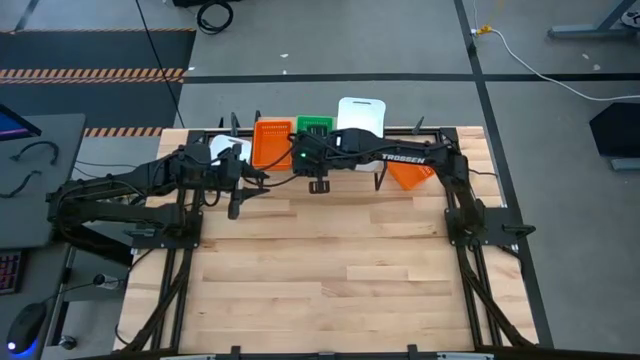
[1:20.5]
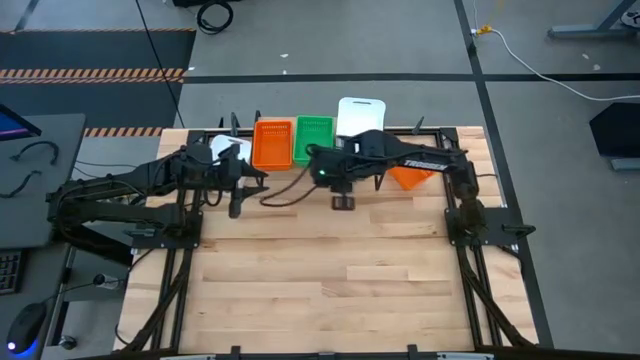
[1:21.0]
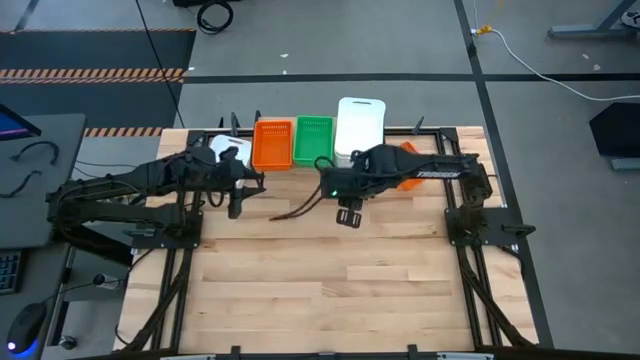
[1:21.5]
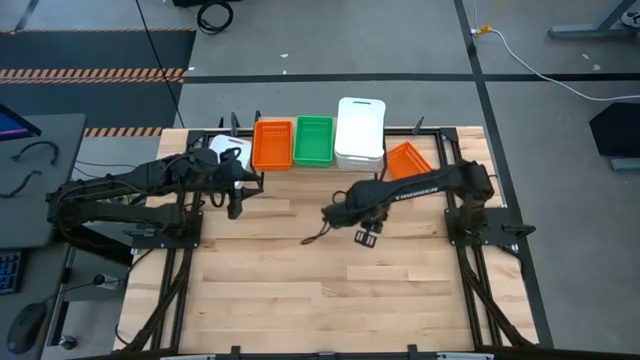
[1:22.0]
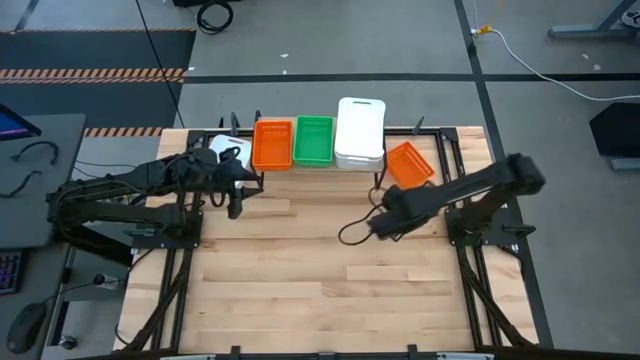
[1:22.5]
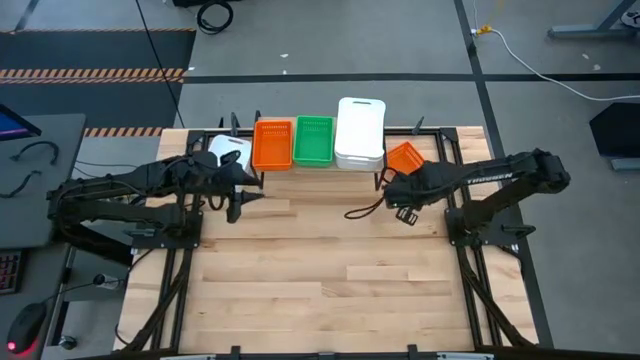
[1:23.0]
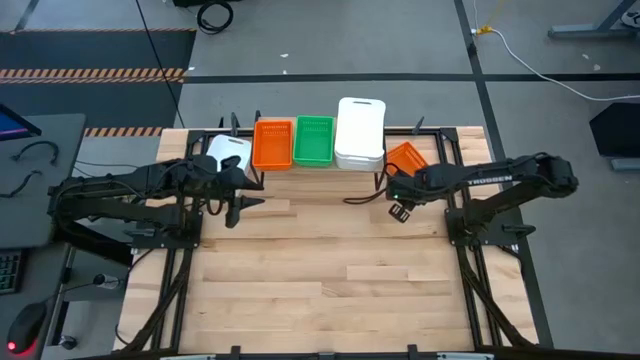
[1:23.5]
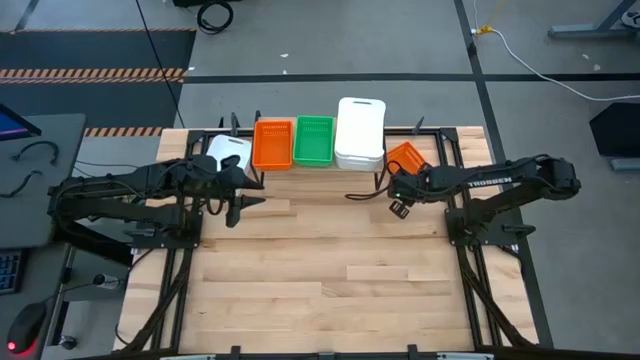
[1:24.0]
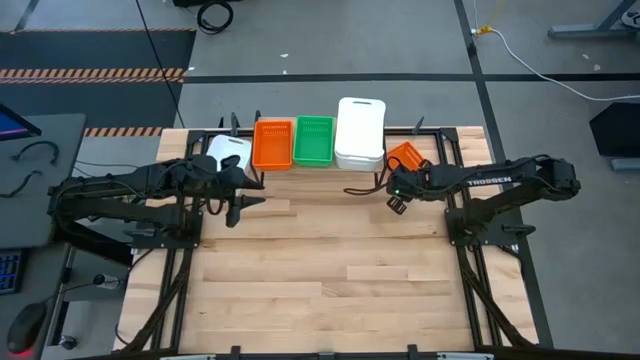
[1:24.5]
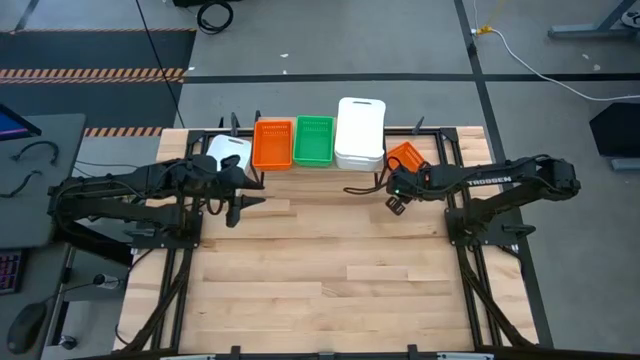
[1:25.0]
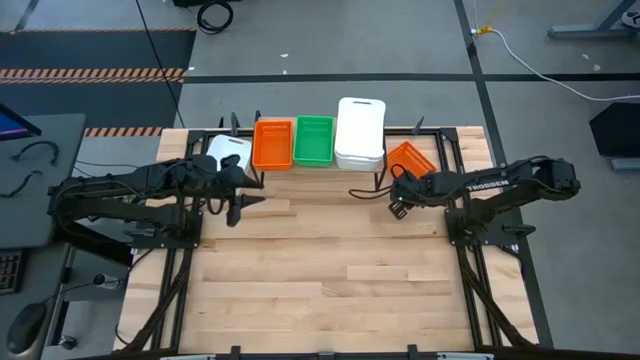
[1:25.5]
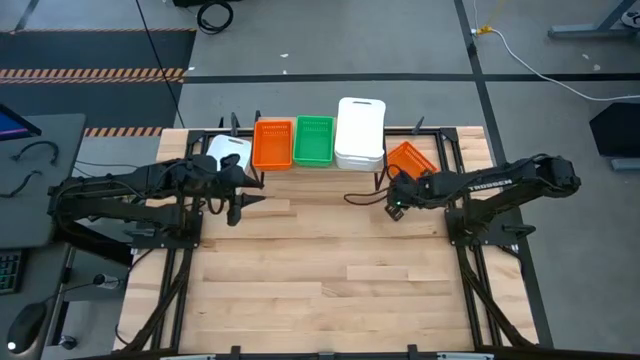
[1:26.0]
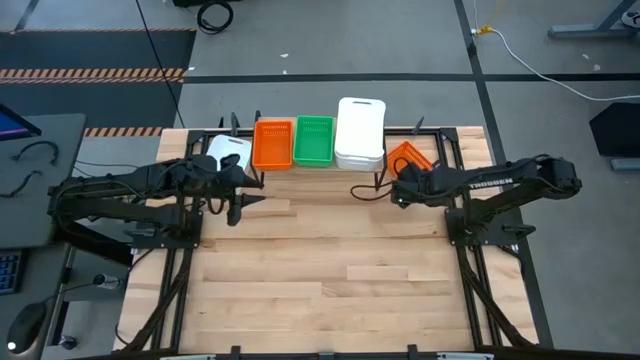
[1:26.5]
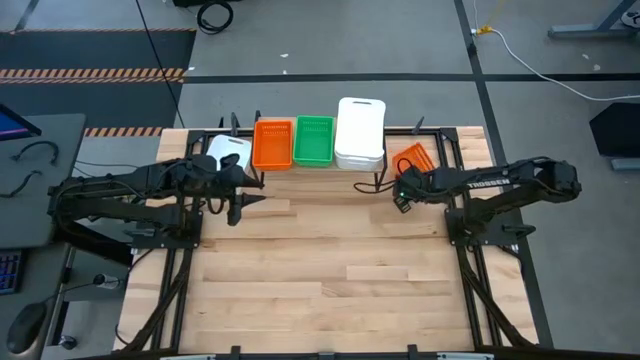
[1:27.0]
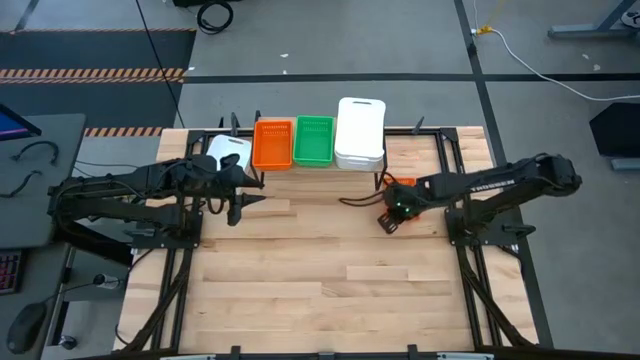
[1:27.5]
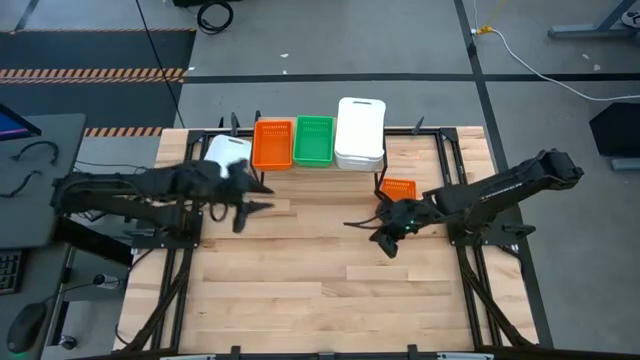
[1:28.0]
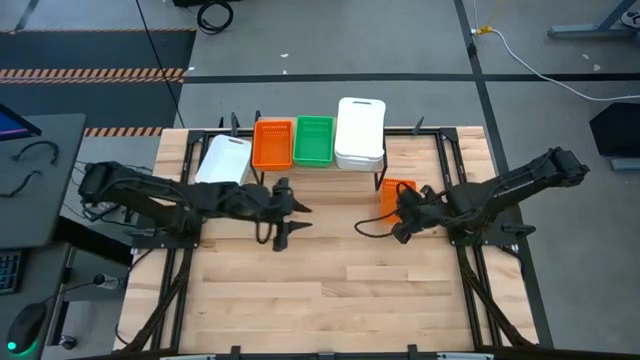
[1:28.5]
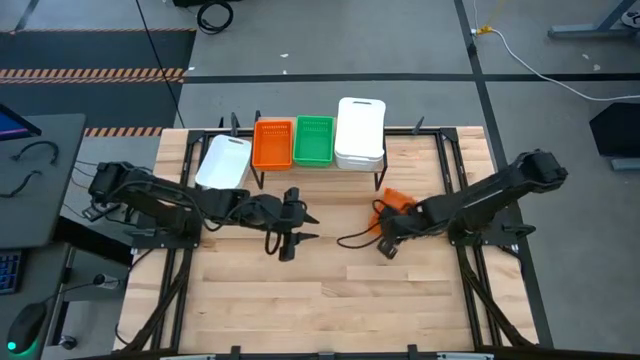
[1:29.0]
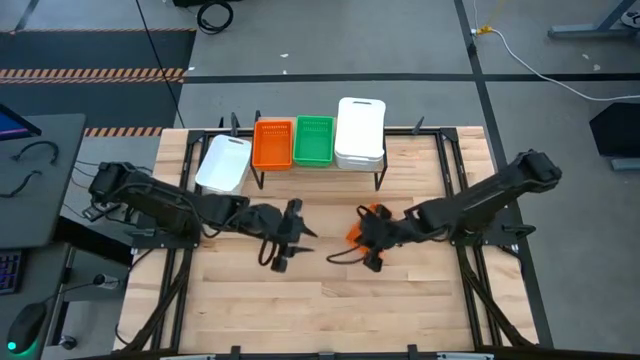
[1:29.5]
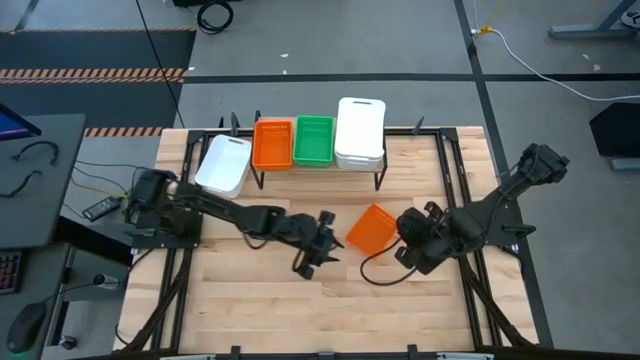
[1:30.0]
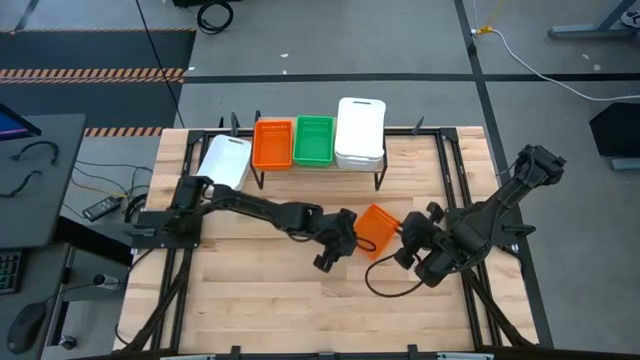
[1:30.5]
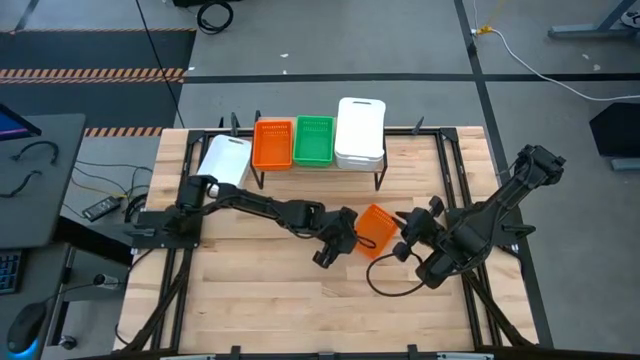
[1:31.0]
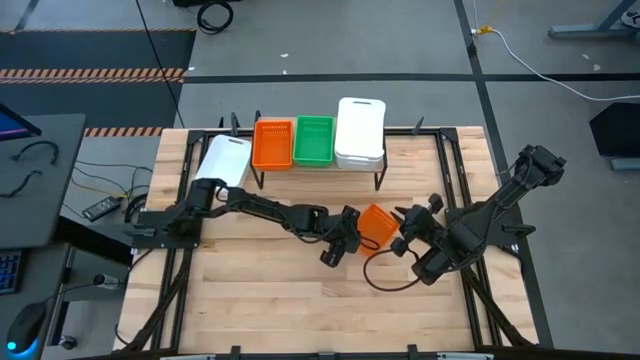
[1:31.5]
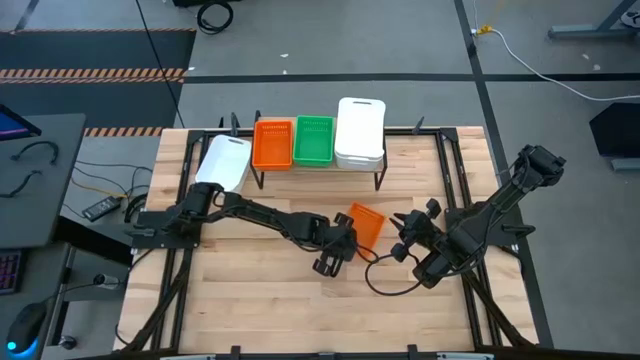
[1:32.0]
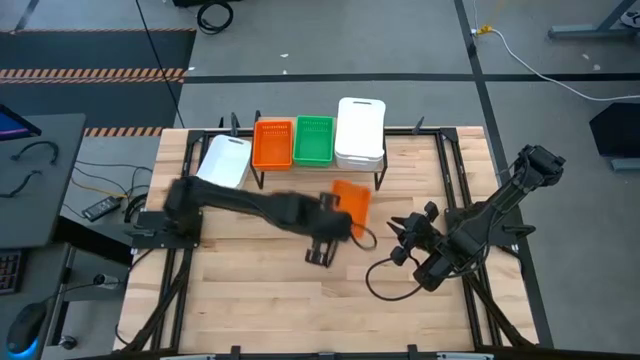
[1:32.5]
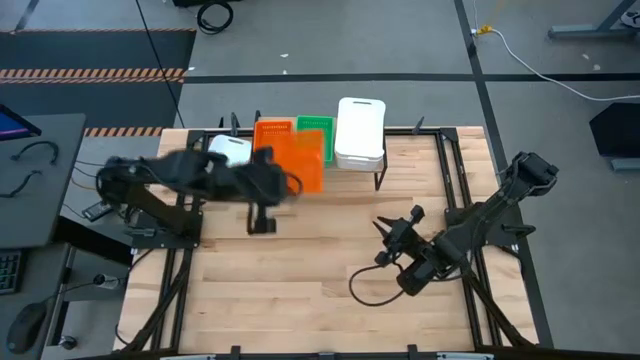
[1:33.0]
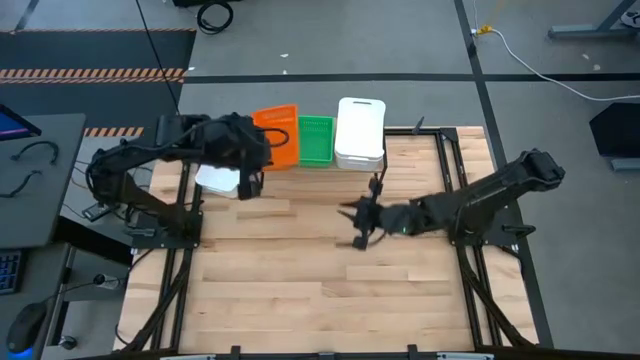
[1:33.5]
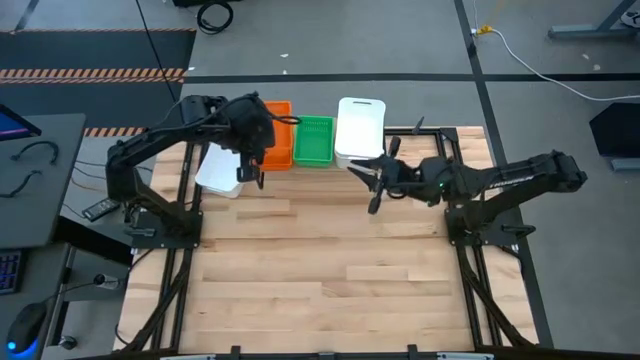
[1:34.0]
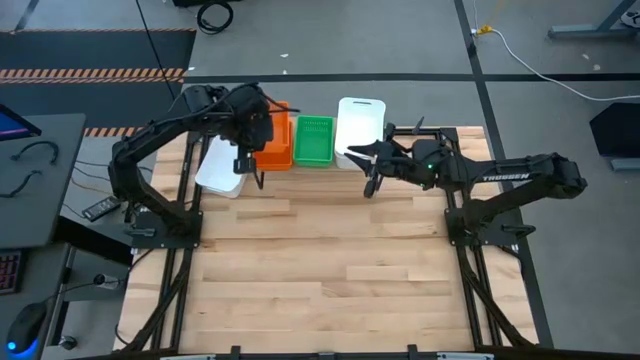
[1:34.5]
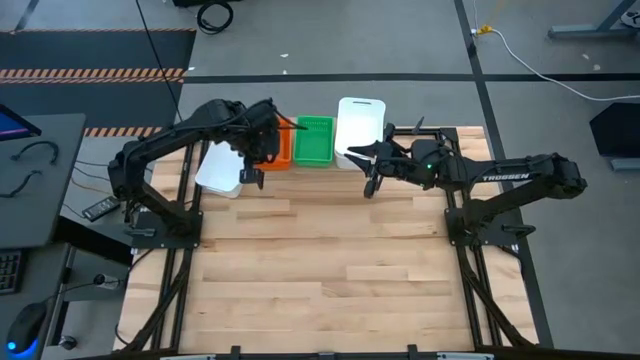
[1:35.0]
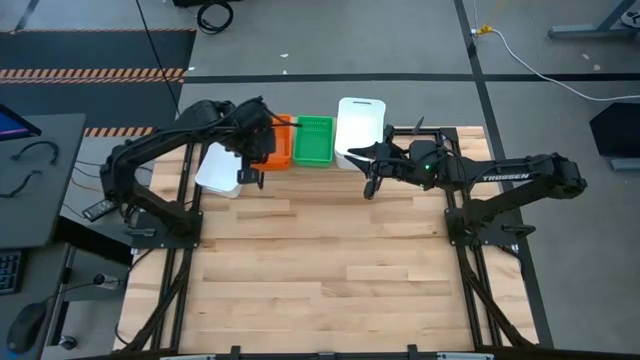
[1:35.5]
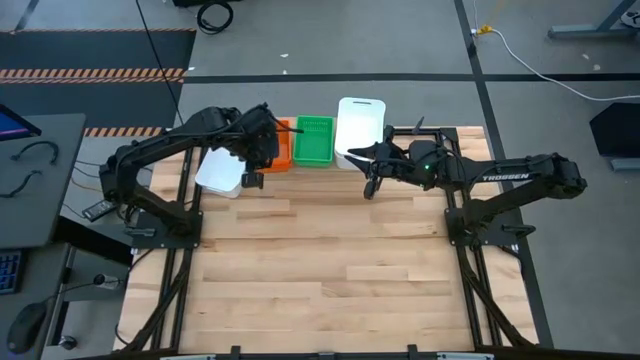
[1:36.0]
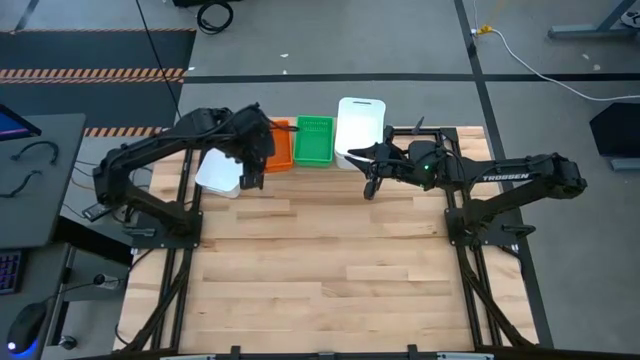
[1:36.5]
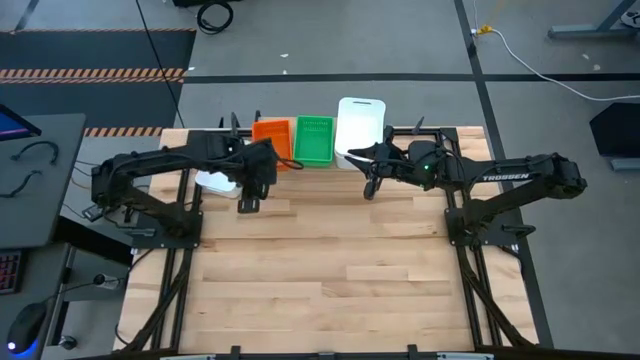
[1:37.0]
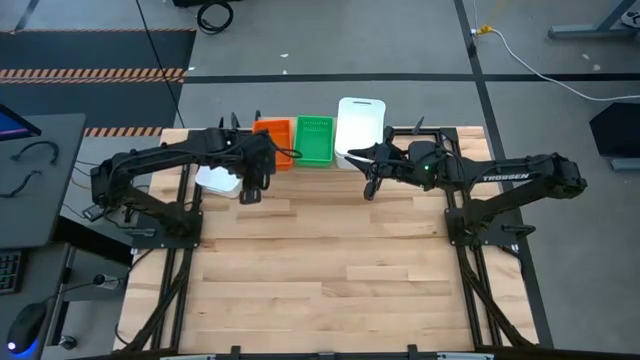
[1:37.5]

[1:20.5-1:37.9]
Task: Stack baskets on shelf by color
Stack the orange bin on top of the stacked orange bins on the shelf
